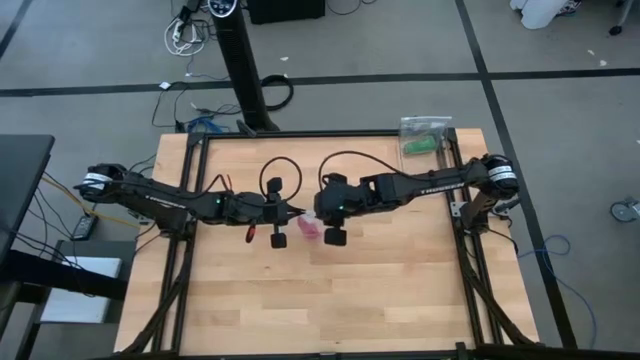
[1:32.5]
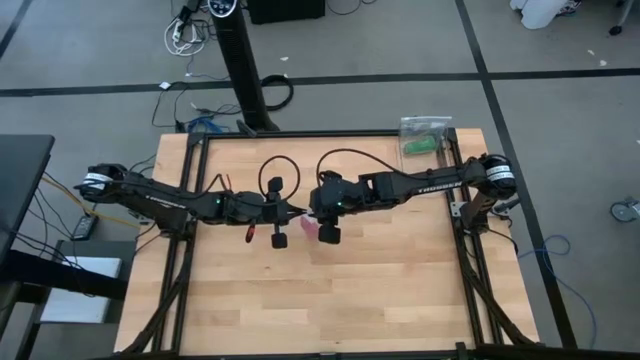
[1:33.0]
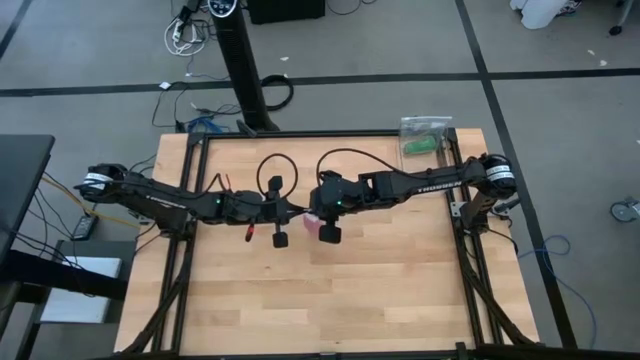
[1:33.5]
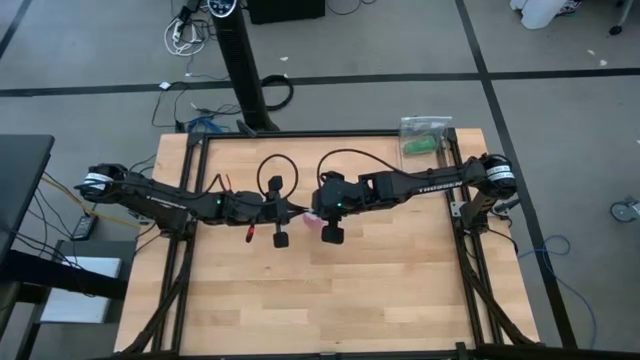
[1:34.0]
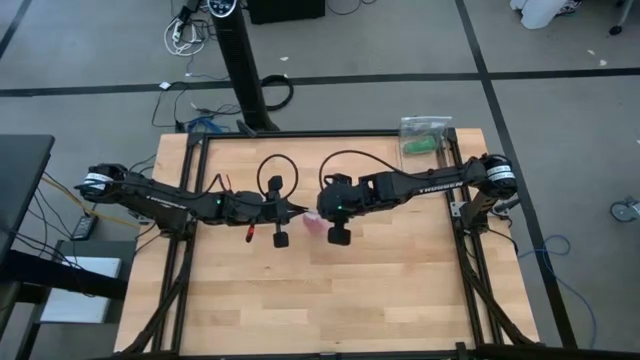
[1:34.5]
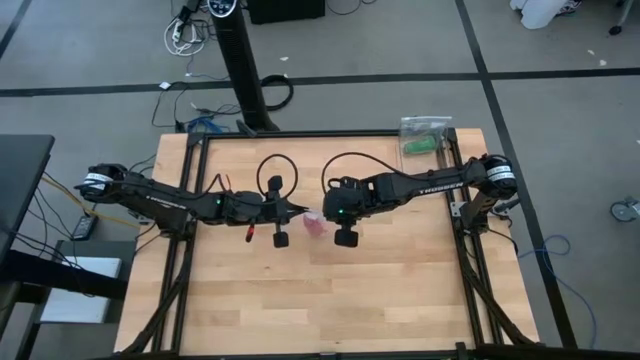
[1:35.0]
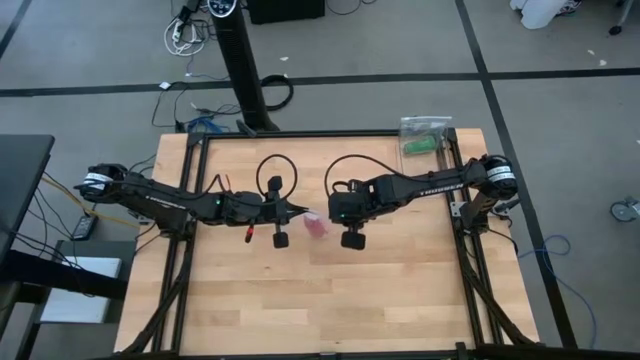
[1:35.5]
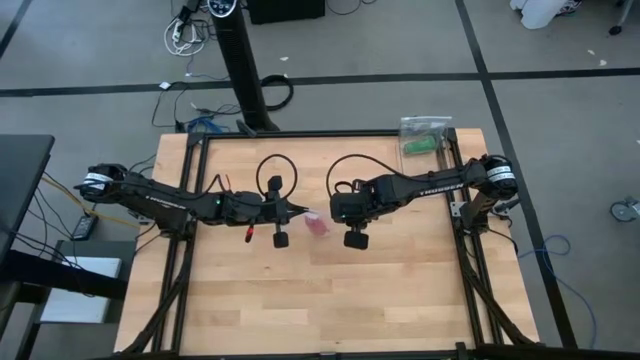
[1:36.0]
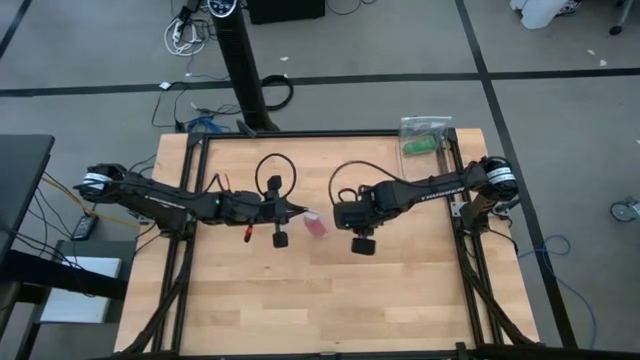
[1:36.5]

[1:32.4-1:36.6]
Task: Roll bandage
Close the transparent zip bag

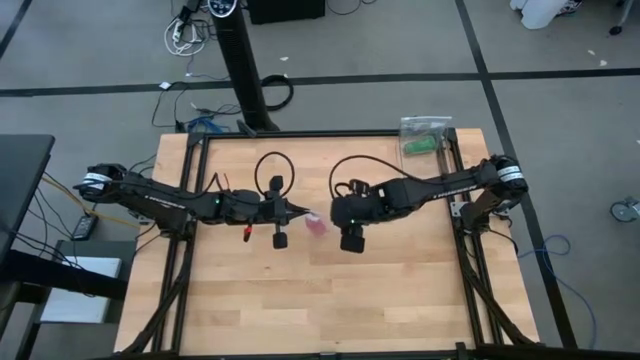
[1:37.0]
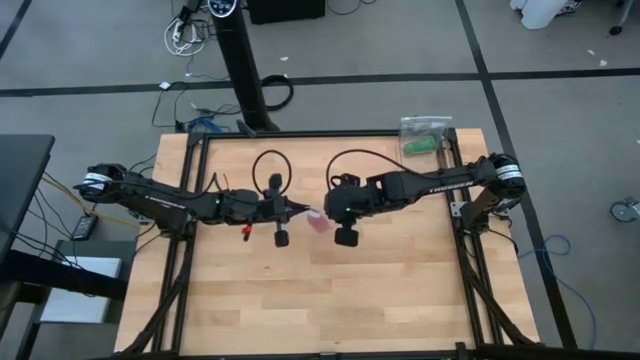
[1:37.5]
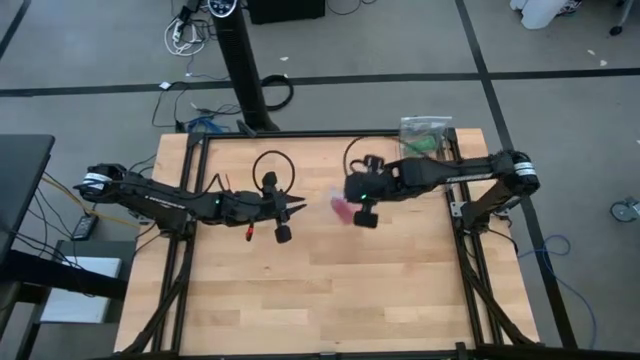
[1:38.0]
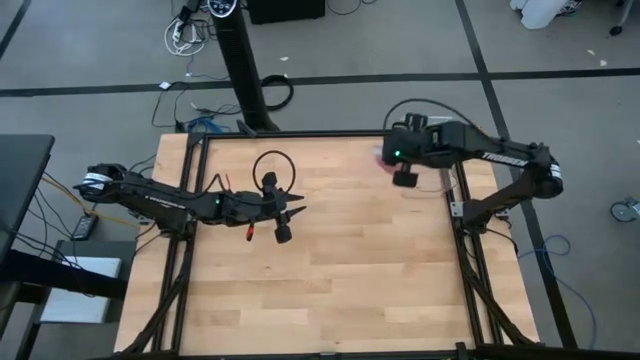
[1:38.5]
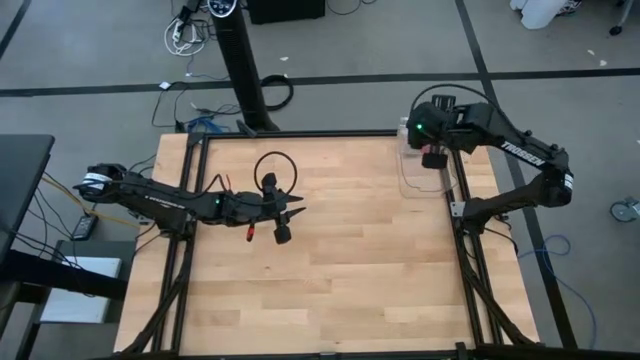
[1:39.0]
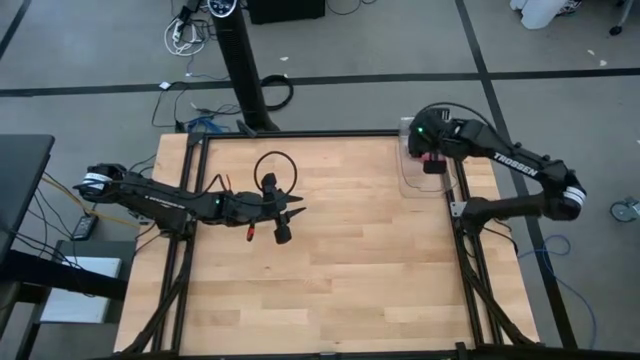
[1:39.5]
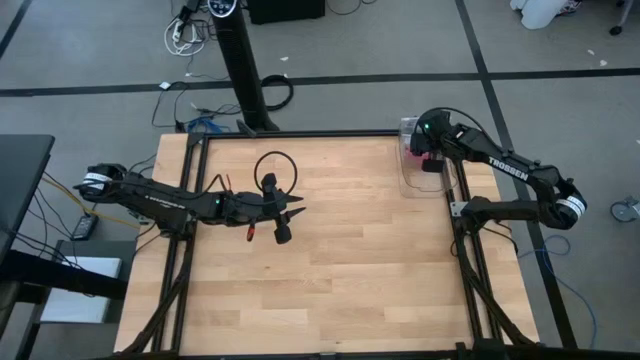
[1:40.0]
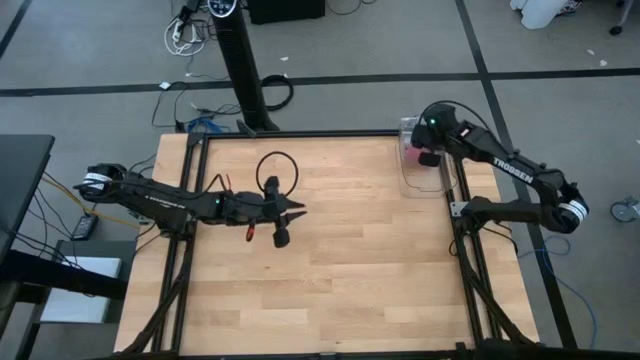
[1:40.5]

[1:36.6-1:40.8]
Put the transparent zip bag into the transparent bin

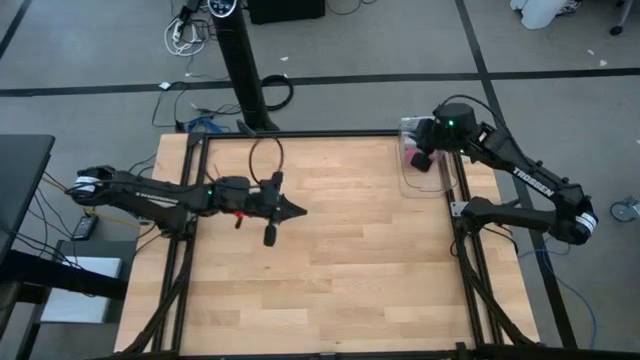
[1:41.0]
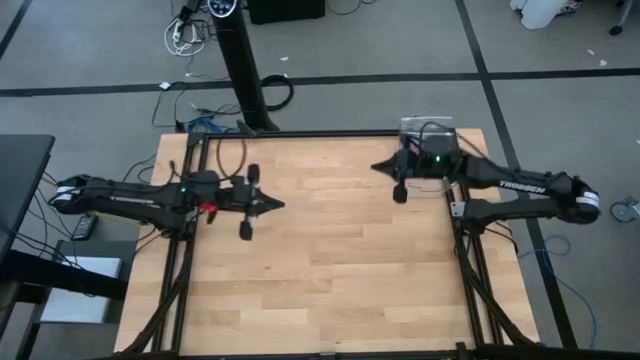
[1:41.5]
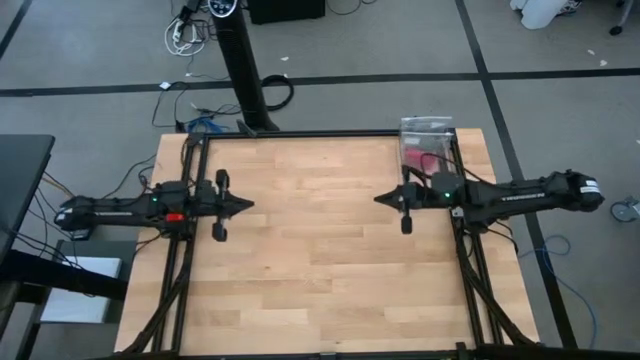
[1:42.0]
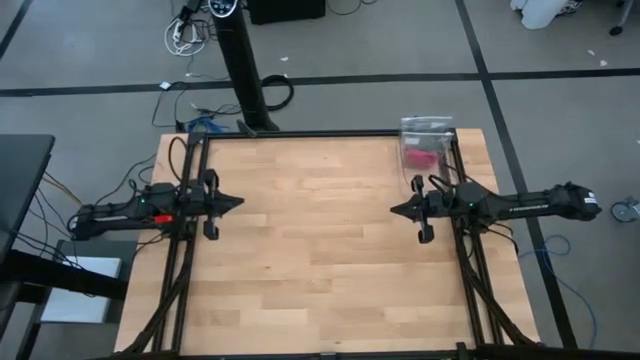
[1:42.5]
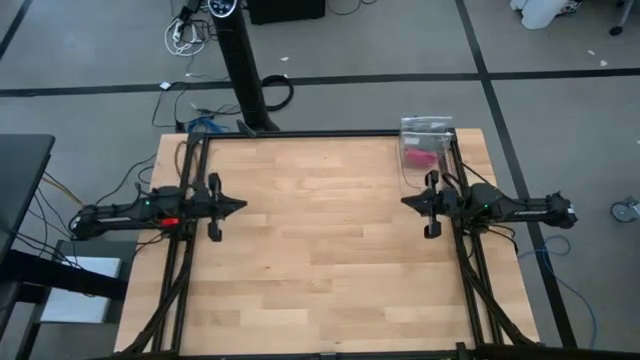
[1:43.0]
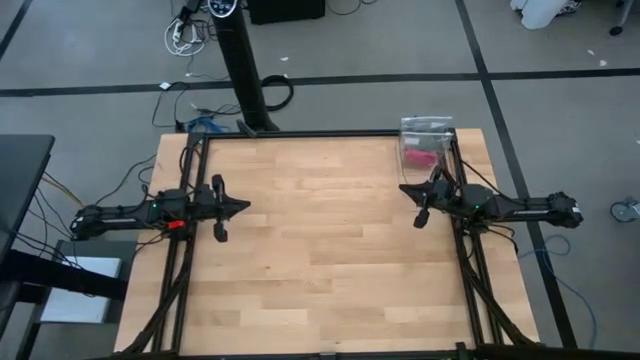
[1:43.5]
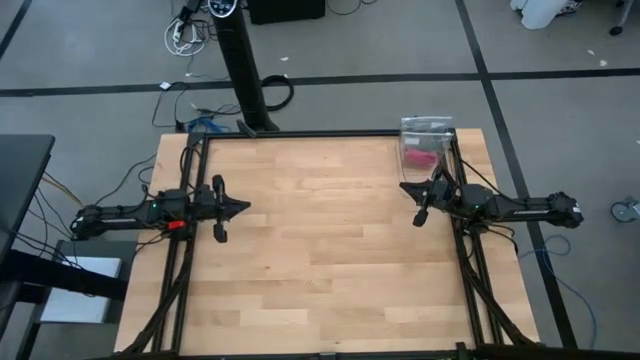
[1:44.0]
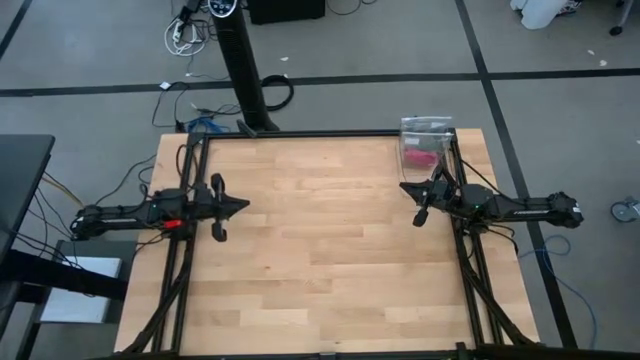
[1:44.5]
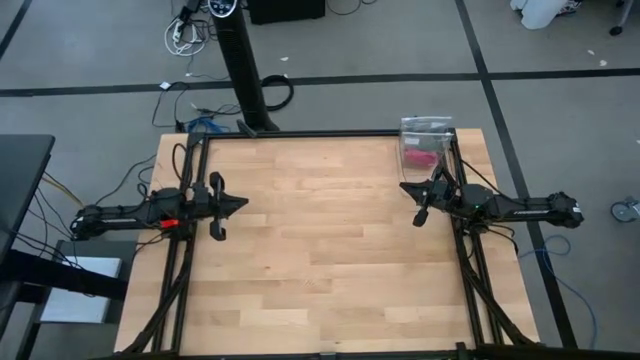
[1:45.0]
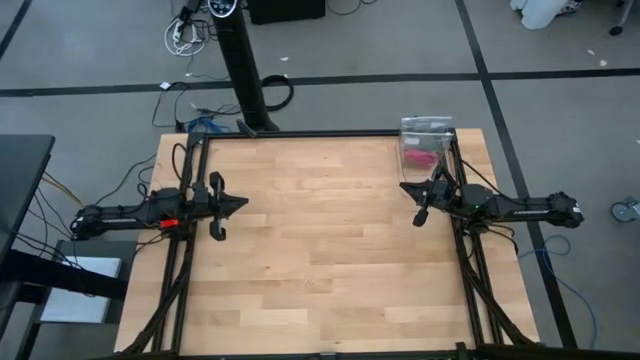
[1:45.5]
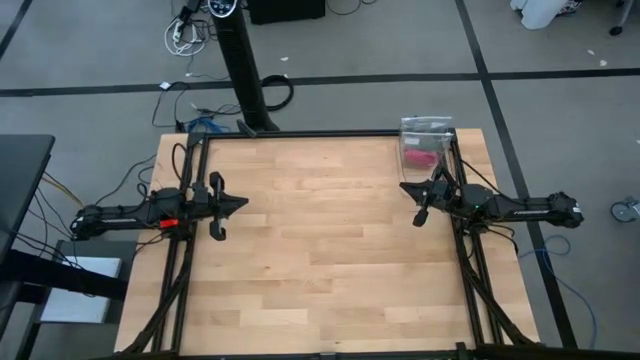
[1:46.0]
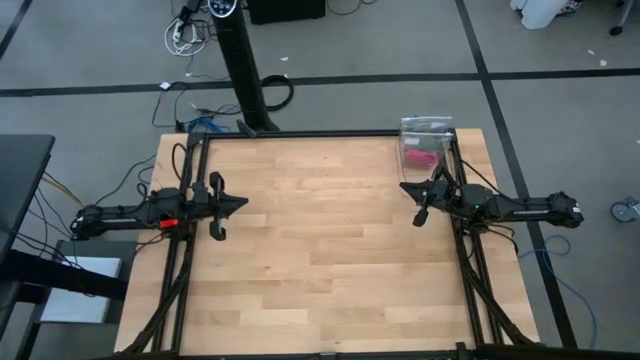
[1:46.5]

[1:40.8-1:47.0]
Return to Home Position

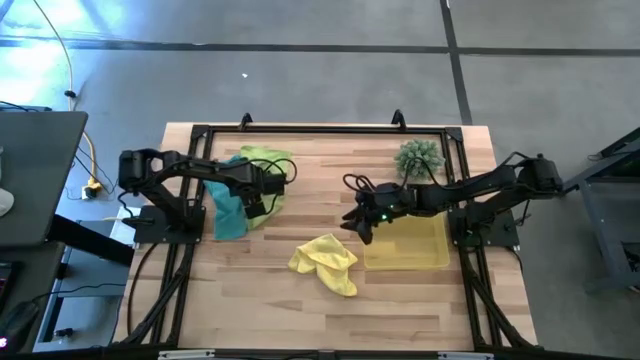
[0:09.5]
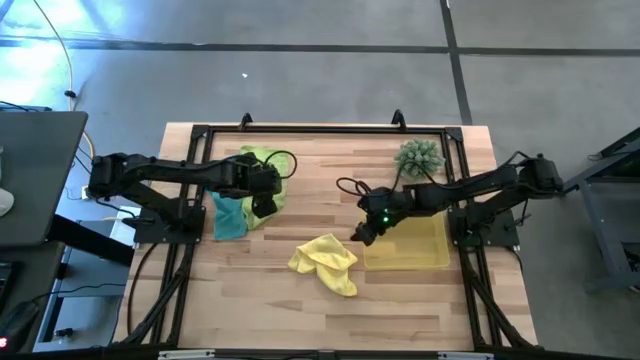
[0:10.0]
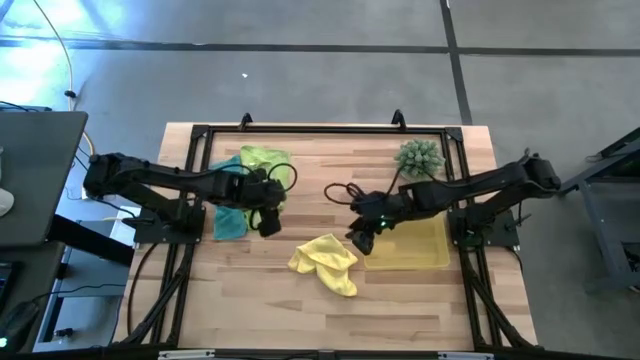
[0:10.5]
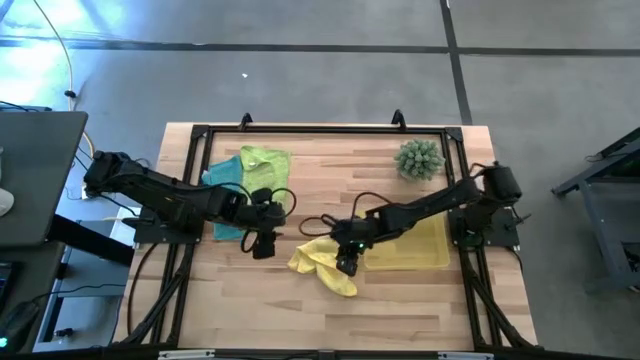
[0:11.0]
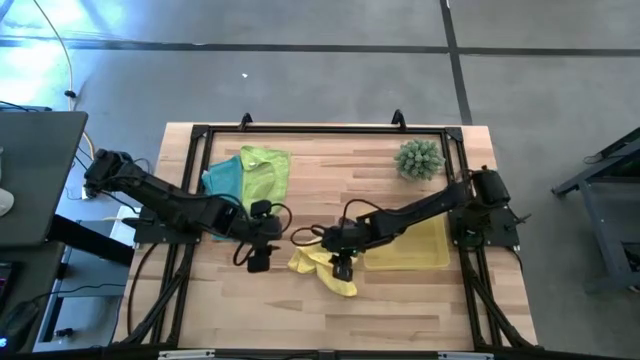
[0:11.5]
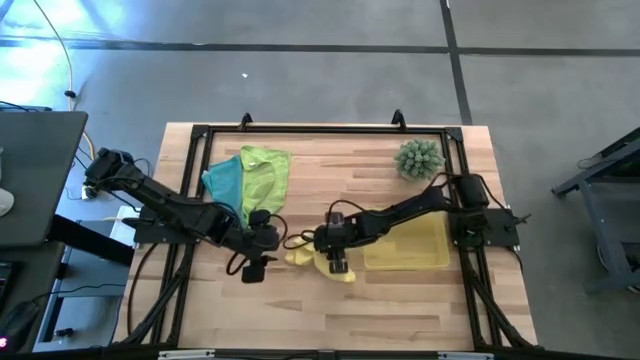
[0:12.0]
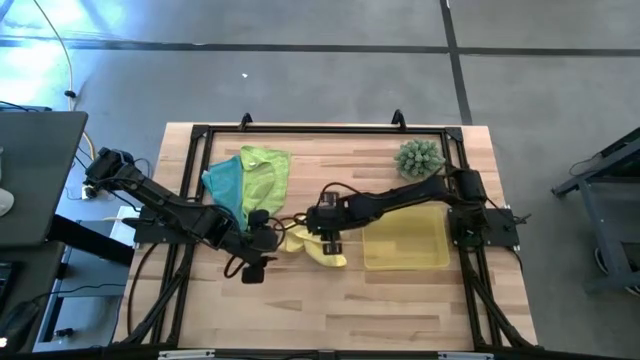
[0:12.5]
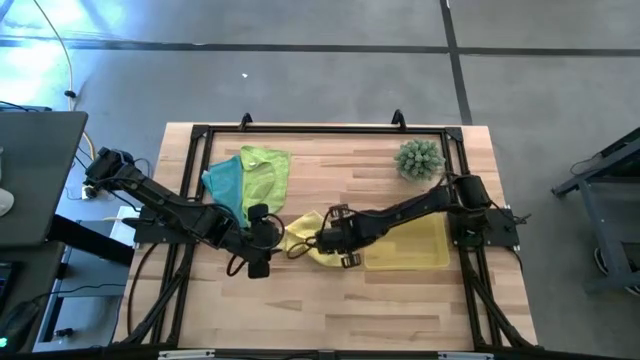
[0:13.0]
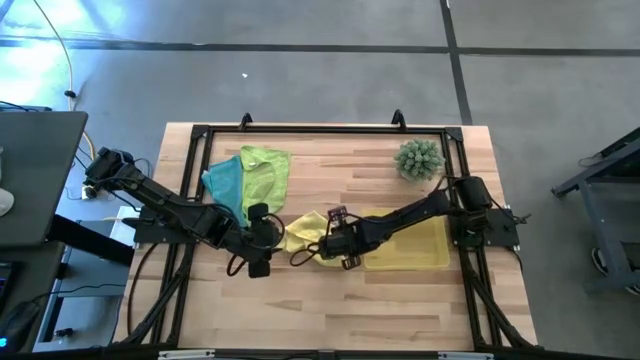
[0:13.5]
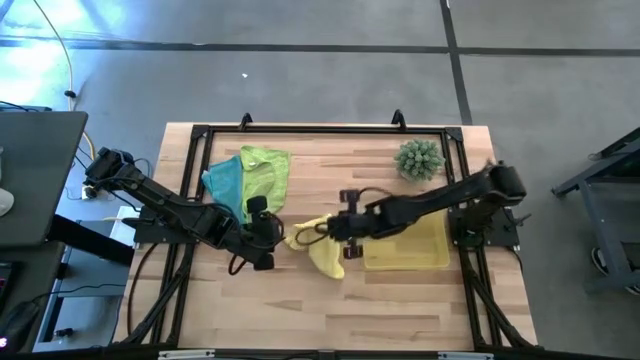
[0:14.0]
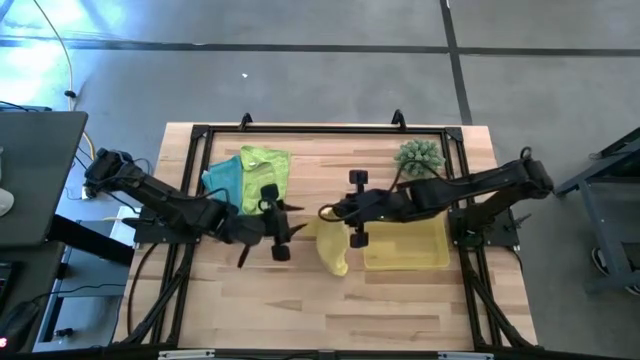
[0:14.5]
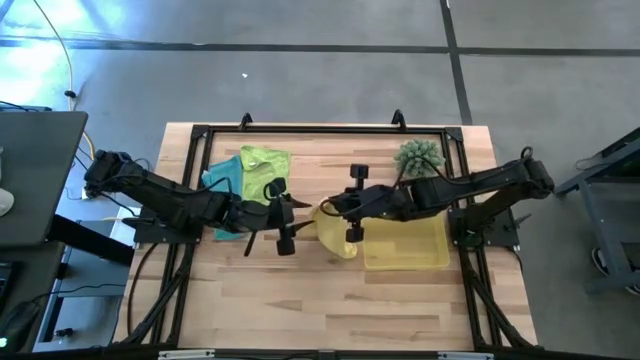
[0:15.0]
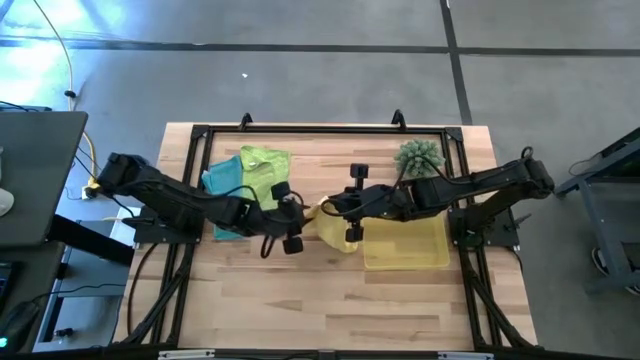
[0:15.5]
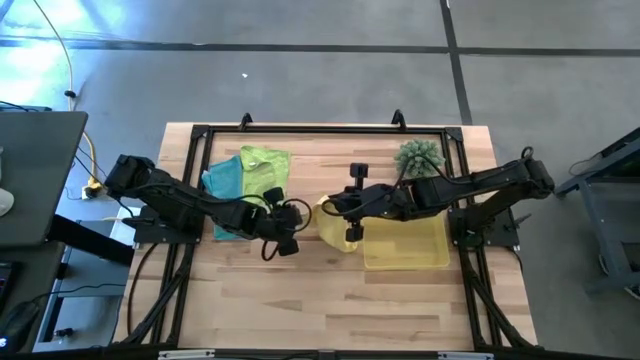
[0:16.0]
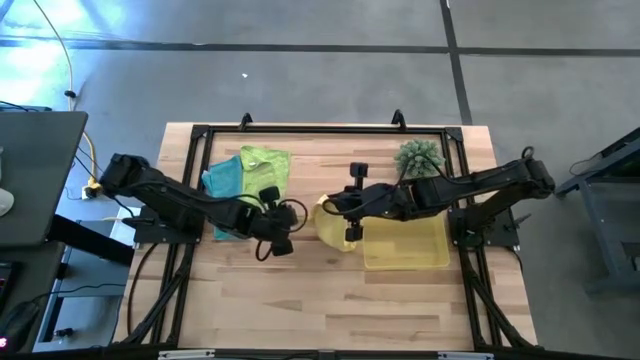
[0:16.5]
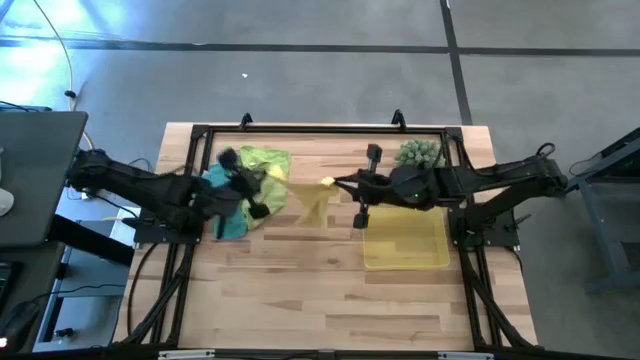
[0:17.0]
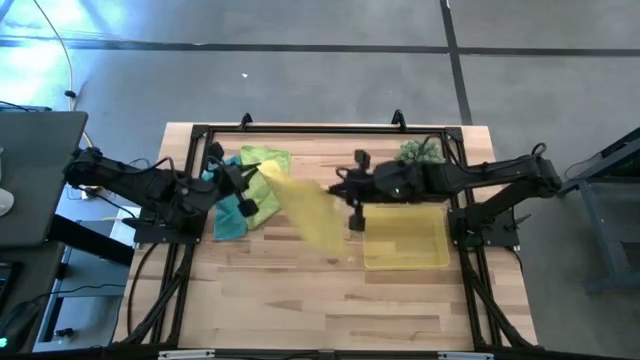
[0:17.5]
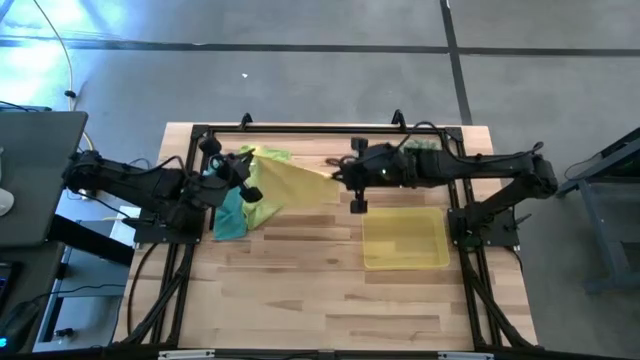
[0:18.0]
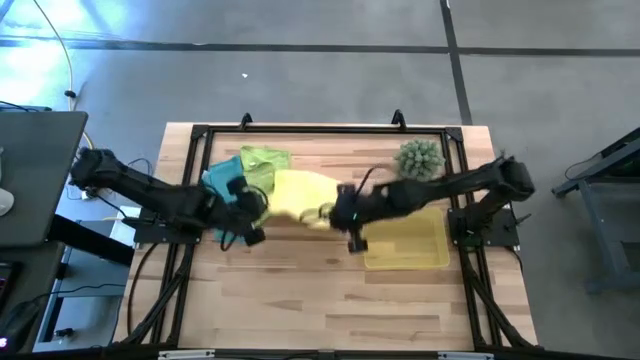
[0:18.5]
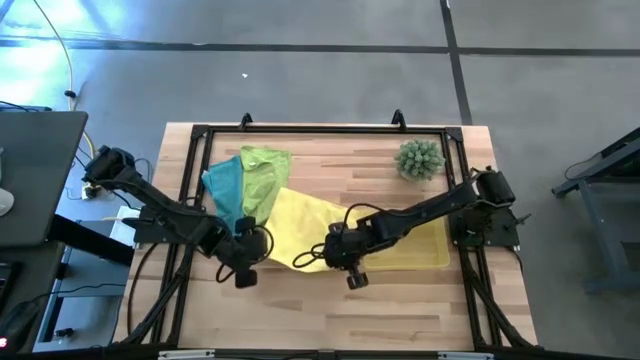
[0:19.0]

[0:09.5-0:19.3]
Task: Roll microfiber towels into tight, uniform cylinder then place into a basket
Fold the yellow microfiber towel
